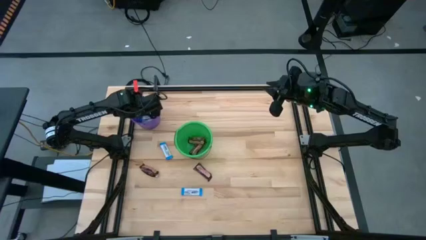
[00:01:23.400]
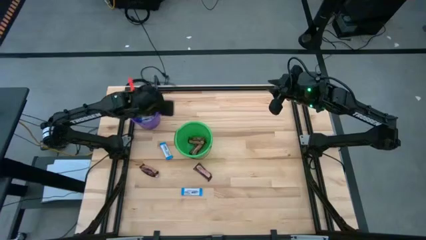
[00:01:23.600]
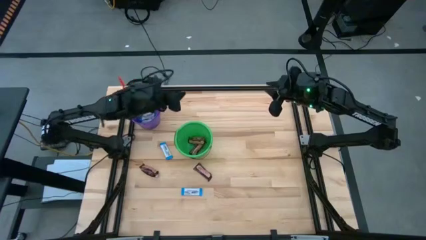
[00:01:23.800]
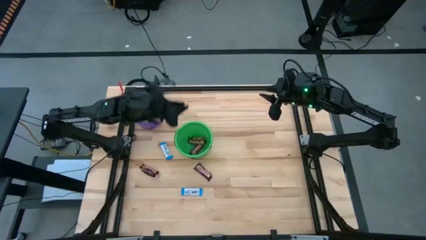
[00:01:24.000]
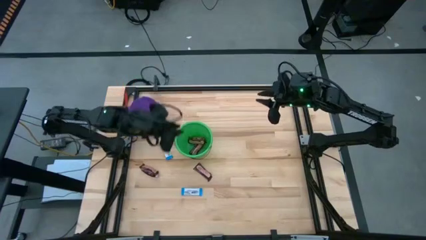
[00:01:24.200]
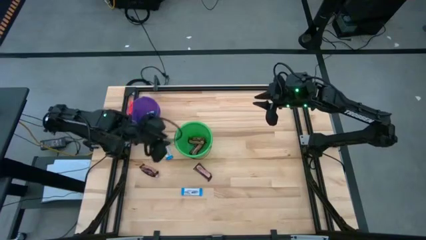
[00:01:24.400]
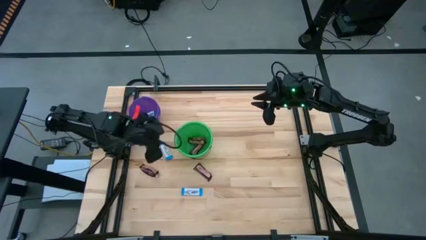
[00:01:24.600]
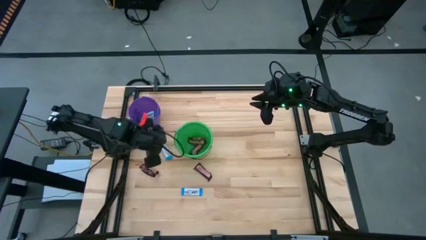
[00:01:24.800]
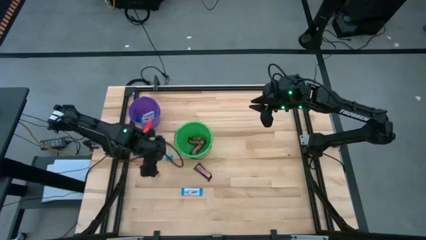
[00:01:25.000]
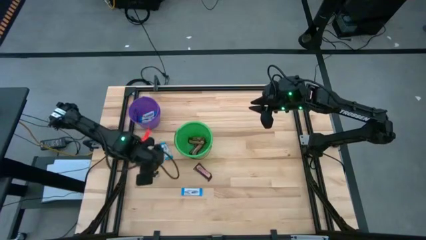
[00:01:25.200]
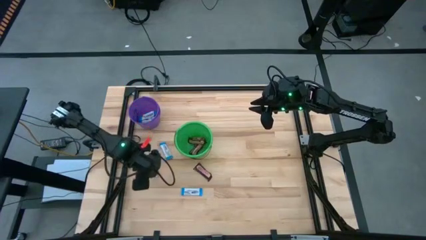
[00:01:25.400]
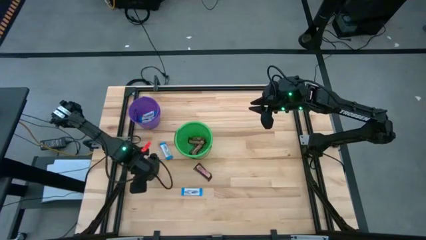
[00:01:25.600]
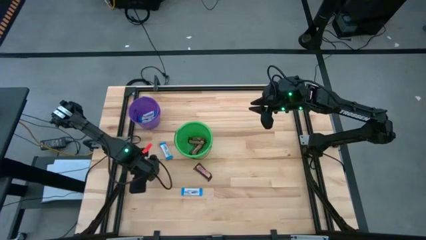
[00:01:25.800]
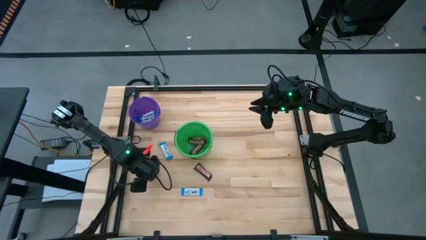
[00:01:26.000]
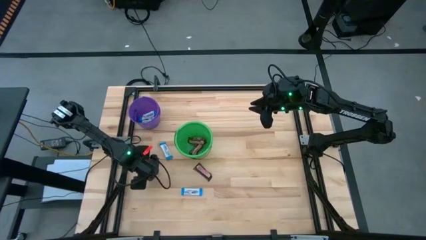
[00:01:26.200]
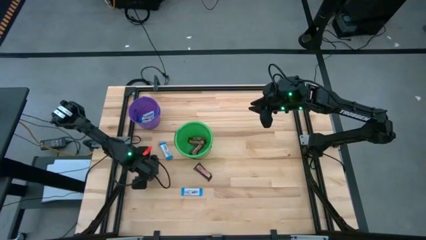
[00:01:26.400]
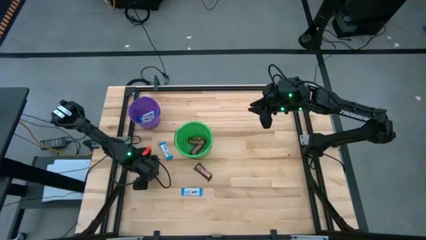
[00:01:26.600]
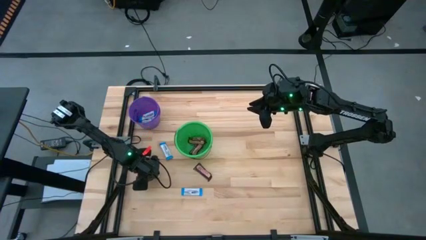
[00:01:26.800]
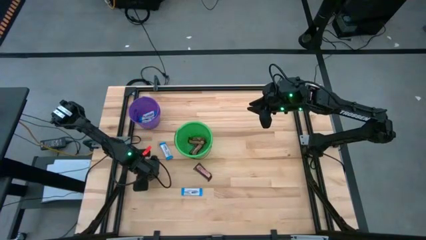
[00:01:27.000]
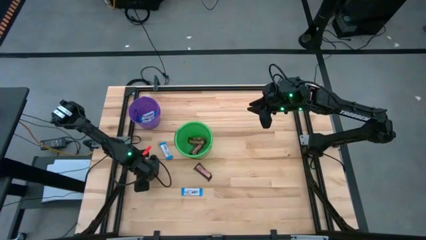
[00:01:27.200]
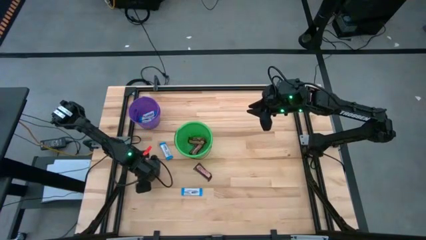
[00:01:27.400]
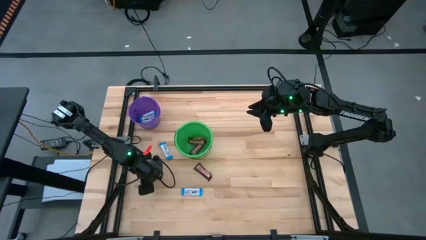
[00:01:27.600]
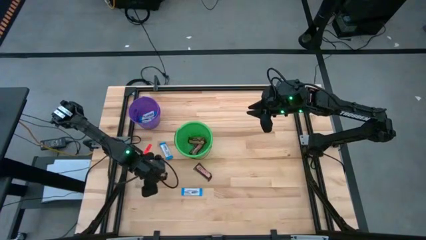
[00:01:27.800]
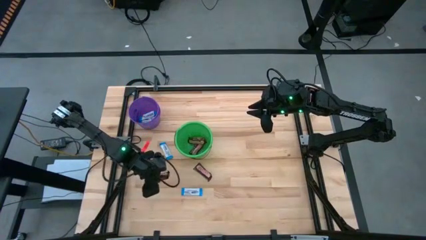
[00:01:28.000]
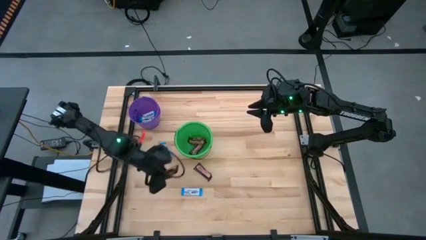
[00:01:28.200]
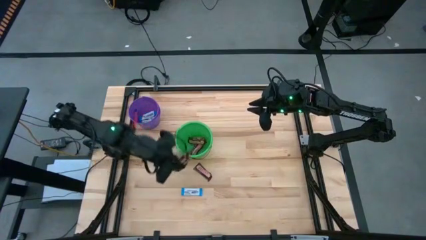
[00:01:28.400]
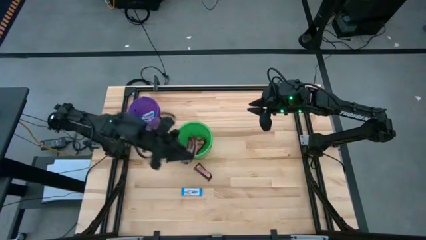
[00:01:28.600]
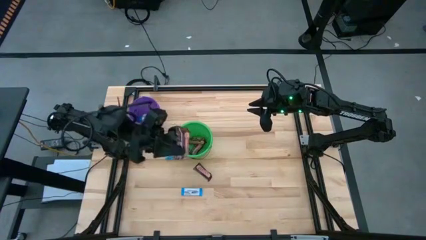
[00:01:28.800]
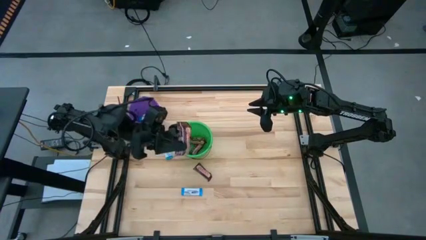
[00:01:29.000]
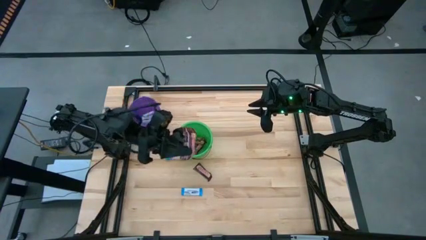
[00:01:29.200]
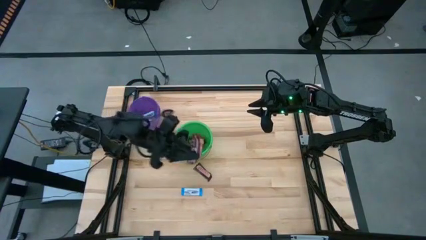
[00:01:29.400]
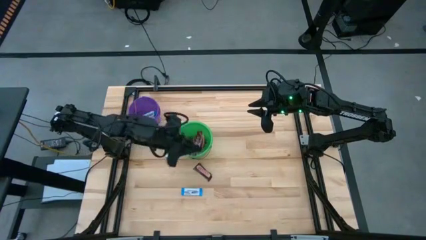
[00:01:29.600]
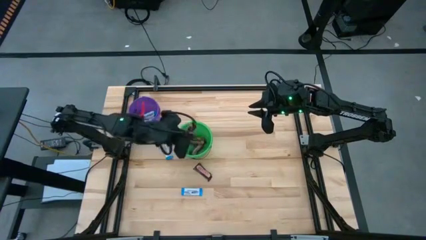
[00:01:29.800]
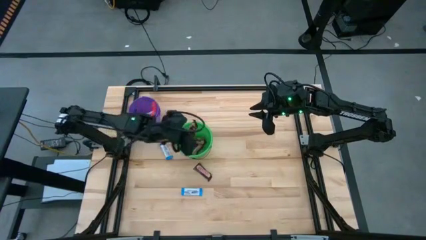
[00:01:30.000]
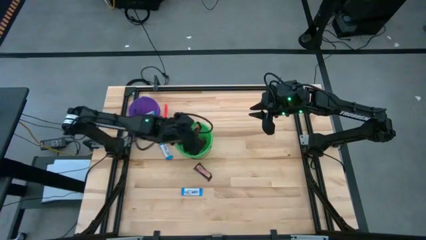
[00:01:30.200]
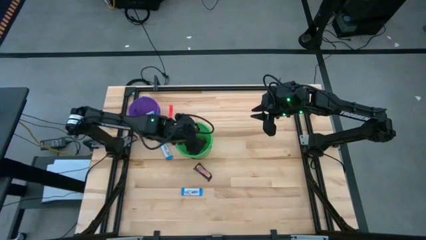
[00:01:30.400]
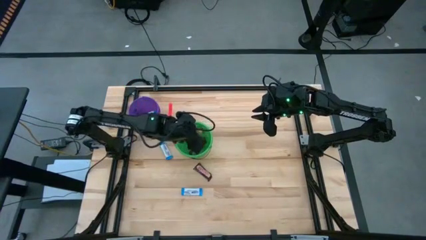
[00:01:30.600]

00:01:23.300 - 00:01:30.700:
Task: Sort candy by brand, put in halloween buckets
Put the left black chocolate bar into the green bucket

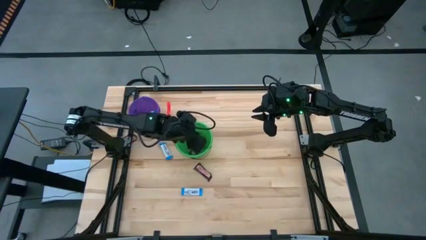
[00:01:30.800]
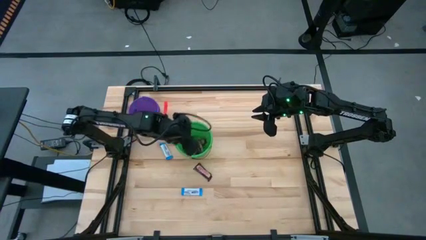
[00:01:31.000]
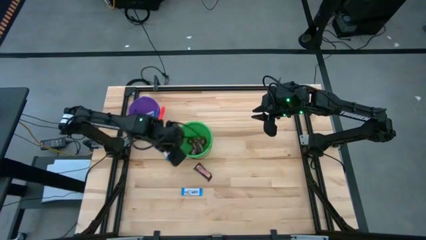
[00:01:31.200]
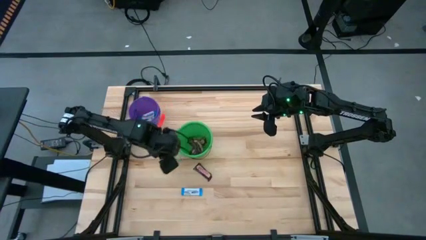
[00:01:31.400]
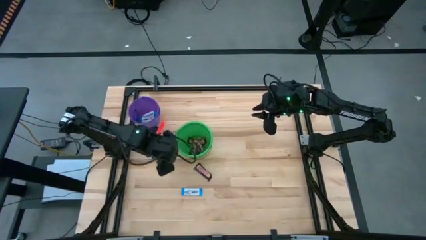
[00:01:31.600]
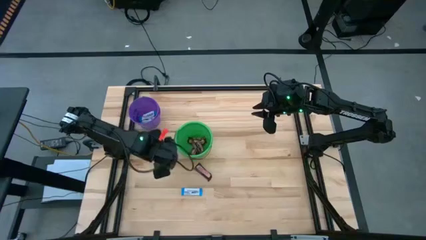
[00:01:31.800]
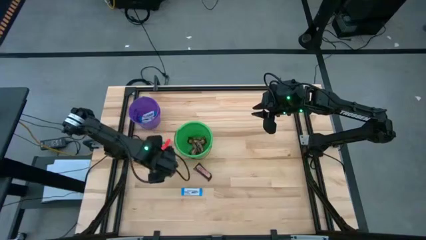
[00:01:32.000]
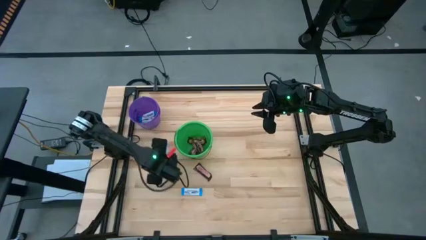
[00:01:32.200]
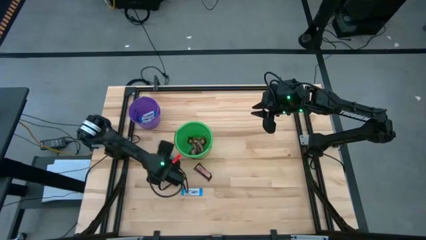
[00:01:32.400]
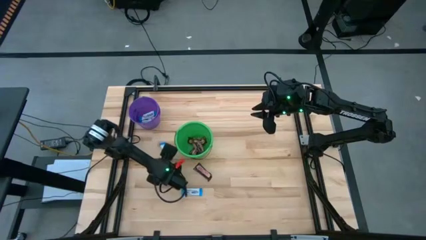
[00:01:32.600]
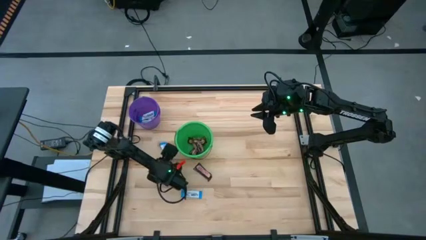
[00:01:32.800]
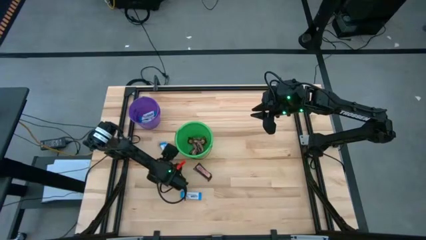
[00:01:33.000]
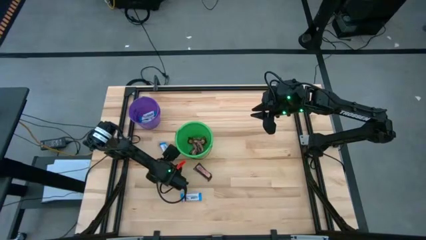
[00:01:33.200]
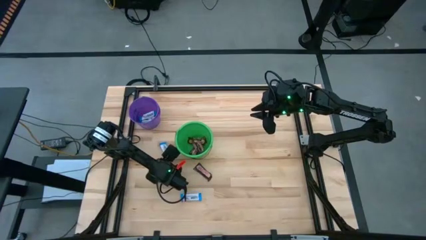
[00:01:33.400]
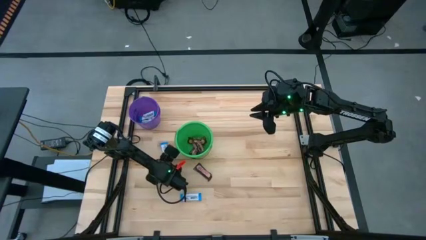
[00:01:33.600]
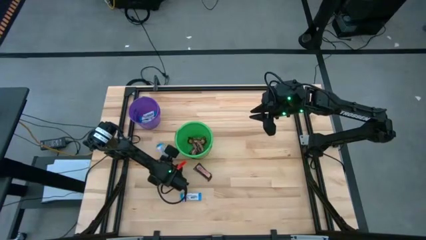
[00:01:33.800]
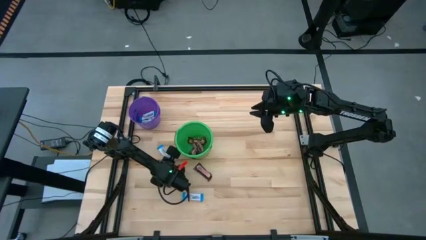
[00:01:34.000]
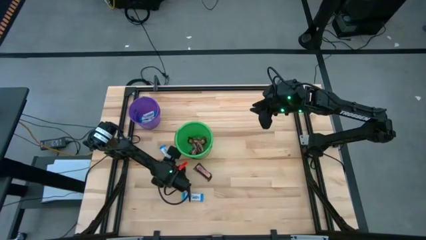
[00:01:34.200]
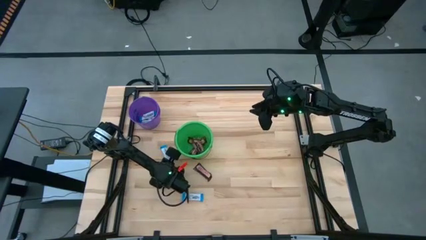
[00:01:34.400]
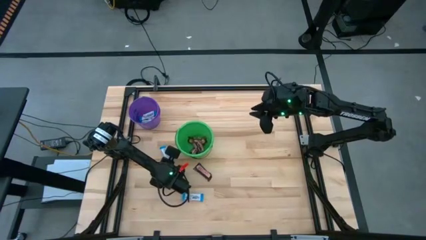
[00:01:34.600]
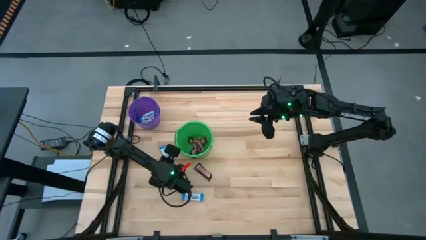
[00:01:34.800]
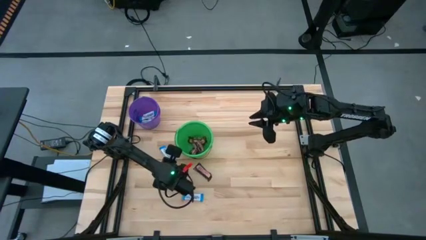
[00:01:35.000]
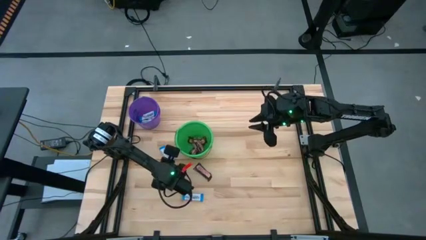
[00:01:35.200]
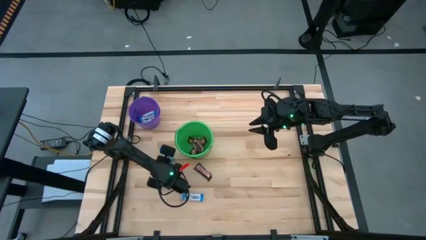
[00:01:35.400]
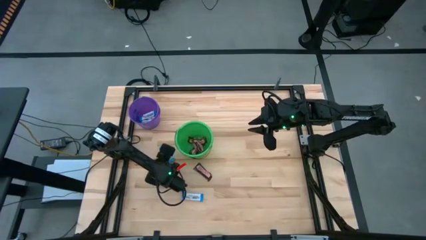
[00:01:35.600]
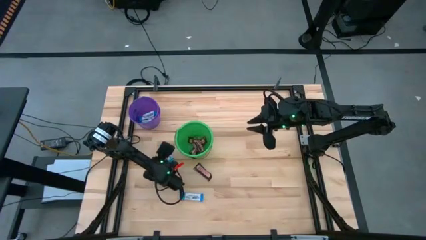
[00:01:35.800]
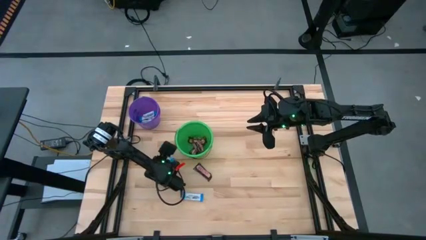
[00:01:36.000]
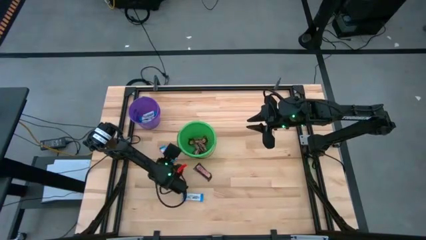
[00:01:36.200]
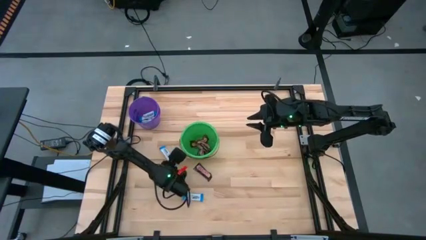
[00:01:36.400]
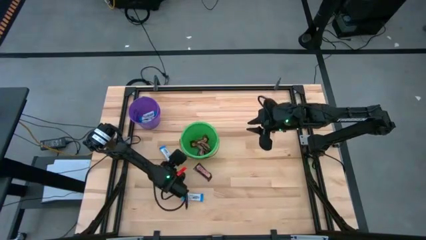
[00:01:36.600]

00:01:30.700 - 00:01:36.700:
Put the white chocolate bar into the violet bucket

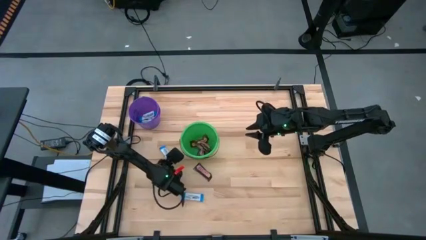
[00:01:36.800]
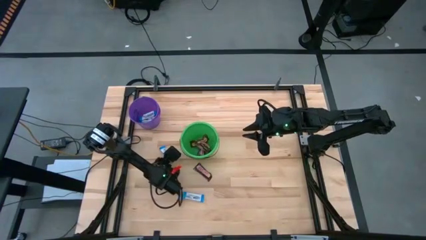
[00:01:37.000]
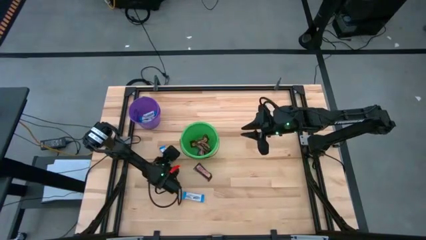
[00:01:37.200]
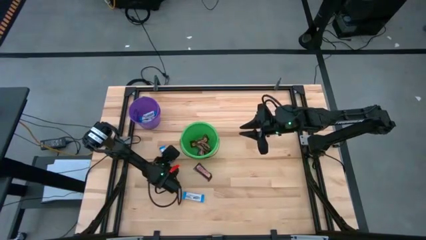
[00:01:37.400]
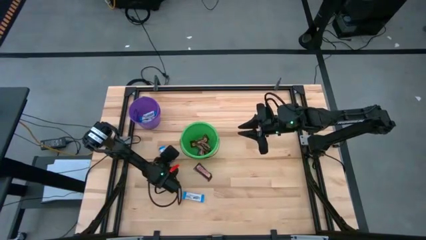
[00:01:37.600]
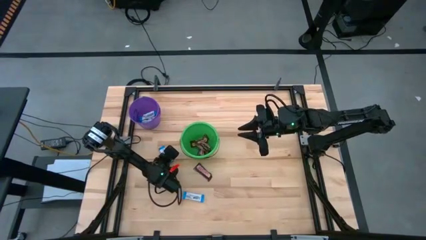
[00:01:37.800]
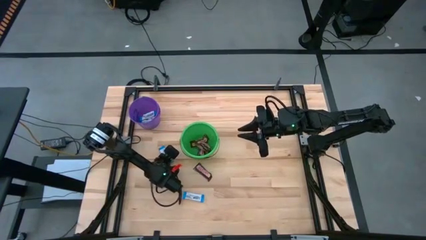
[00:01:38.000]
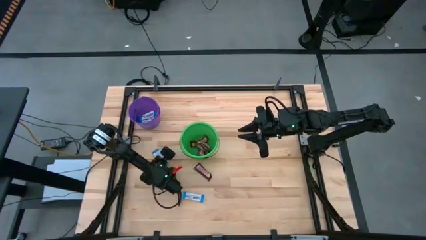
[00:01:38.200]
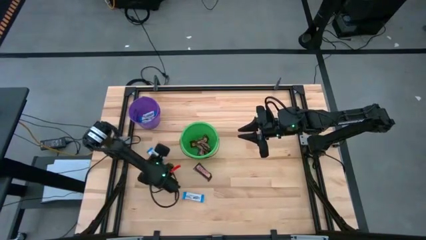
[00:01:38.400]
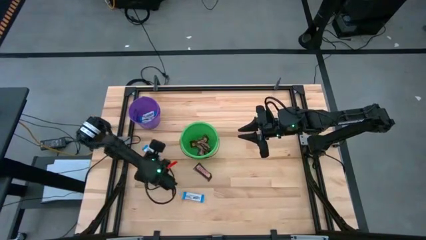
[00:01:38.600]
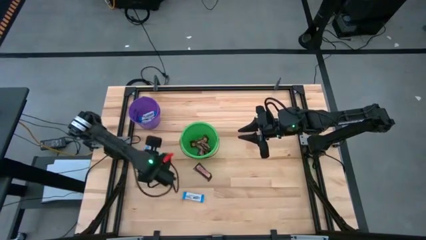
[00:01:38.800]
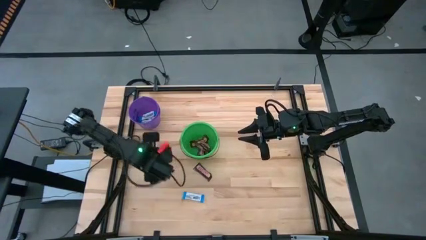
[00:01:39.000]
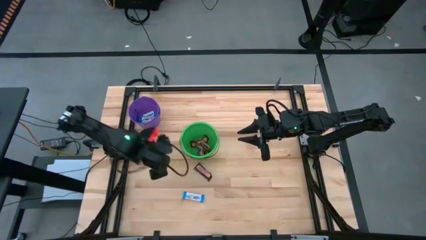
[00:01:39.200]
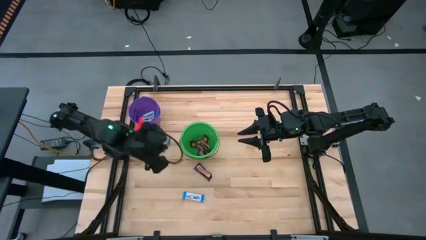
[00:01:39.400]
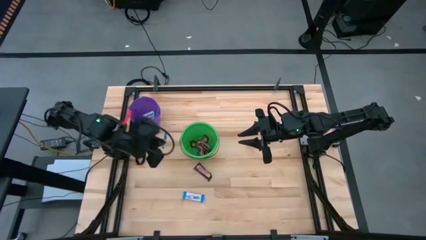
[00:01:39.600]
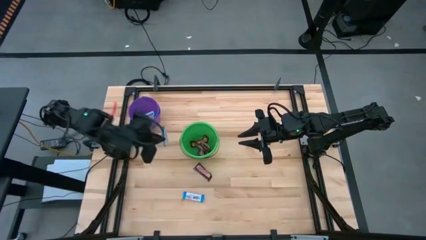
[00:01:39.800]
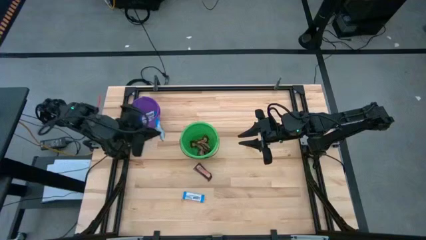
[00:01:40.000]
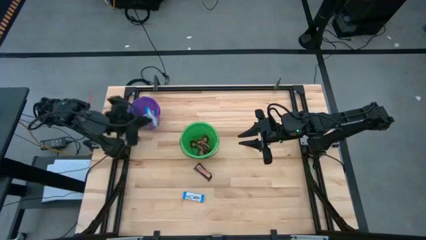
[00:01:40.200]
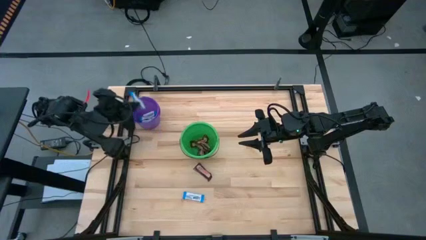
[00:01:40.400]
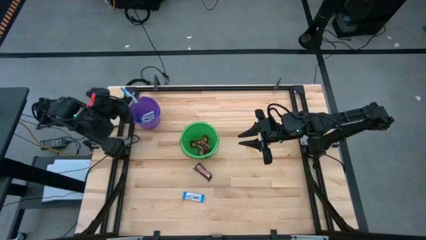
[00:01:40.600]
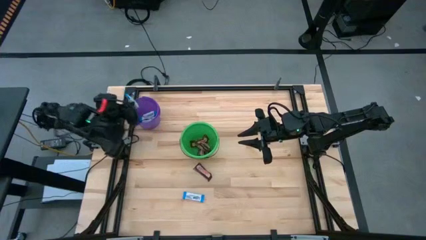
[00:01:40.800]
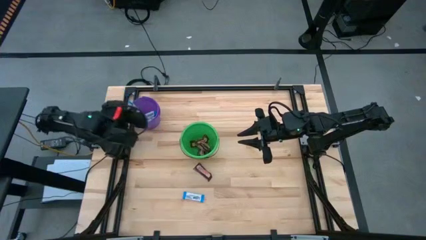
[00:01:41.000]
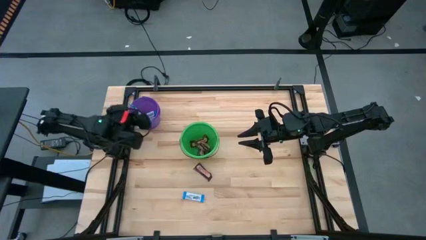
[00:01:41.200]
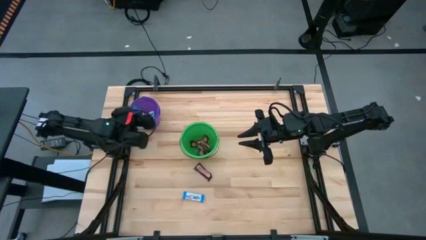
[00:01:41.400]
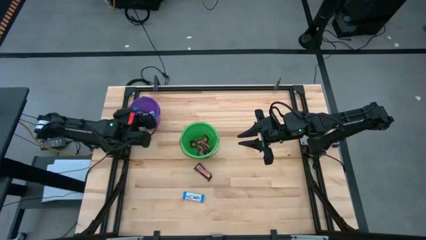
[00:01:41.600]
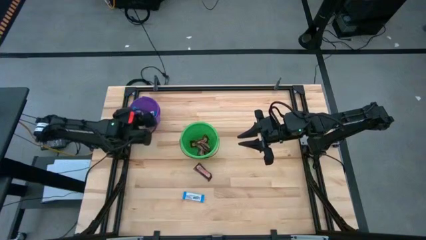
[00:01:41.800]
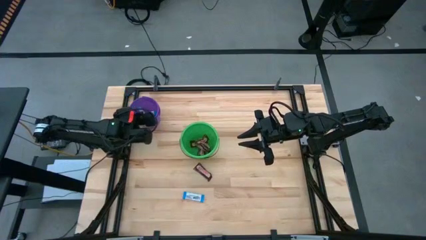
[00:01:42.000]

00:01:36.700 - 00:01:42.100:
Put the white chocolate bar into the violet bucket
